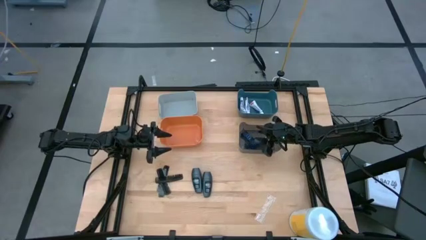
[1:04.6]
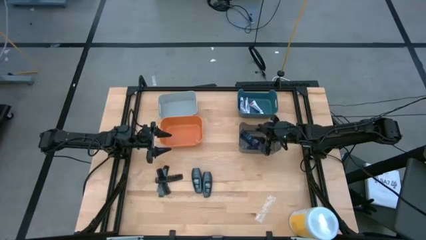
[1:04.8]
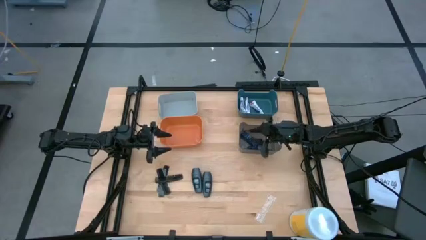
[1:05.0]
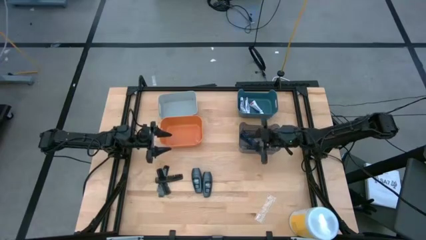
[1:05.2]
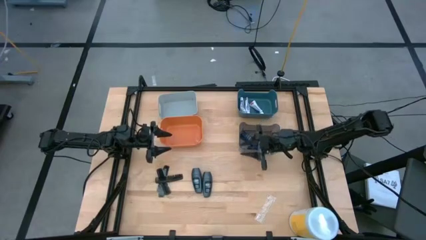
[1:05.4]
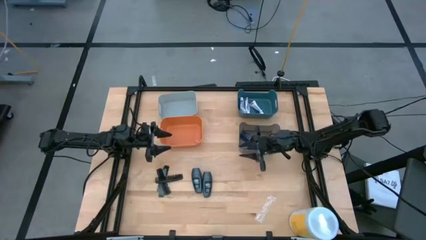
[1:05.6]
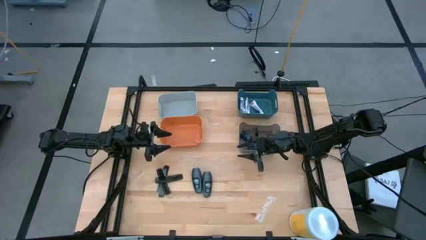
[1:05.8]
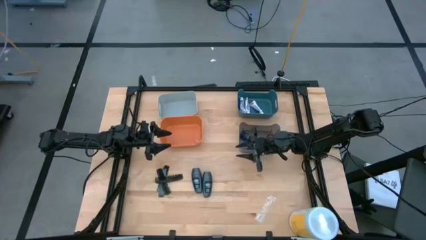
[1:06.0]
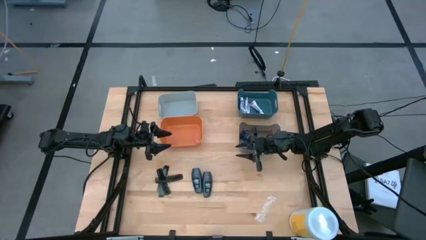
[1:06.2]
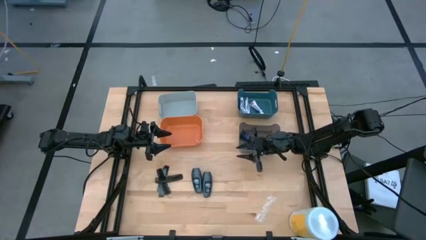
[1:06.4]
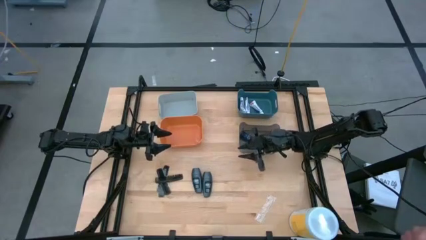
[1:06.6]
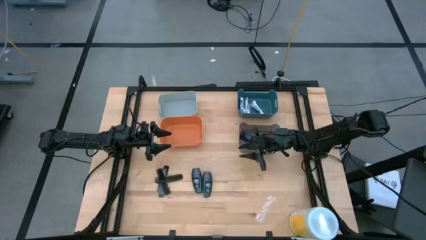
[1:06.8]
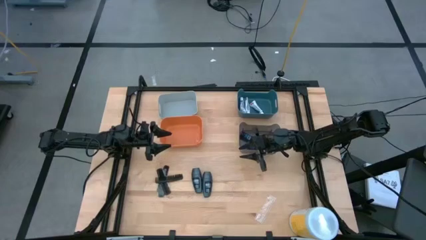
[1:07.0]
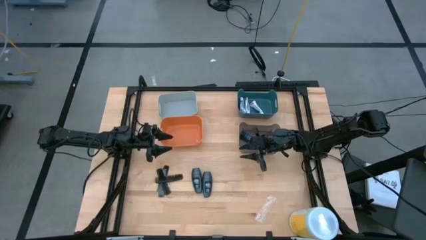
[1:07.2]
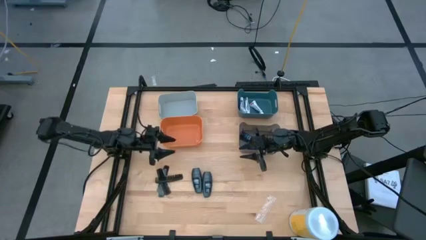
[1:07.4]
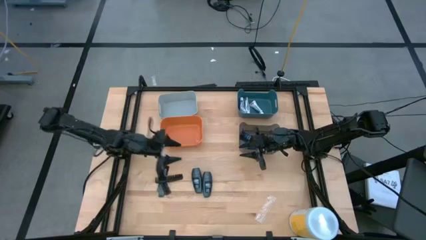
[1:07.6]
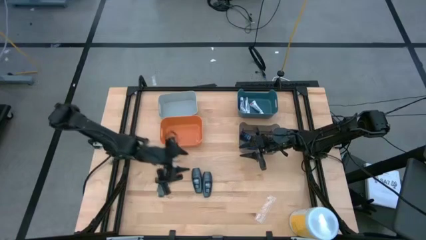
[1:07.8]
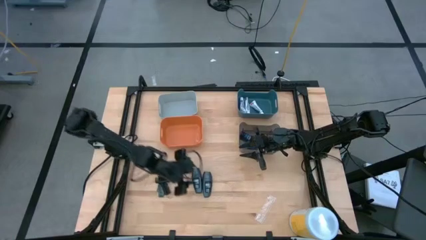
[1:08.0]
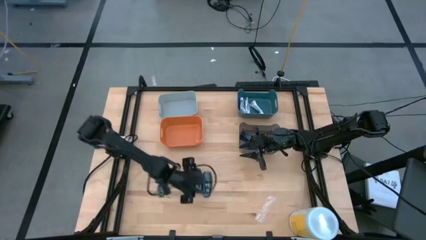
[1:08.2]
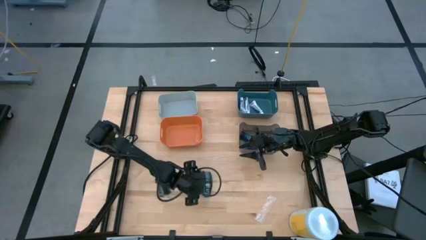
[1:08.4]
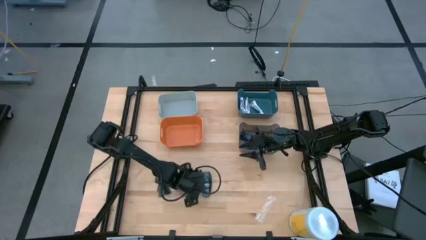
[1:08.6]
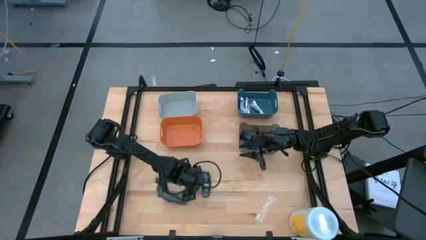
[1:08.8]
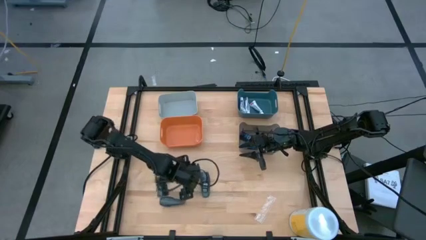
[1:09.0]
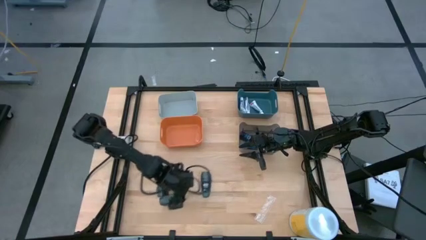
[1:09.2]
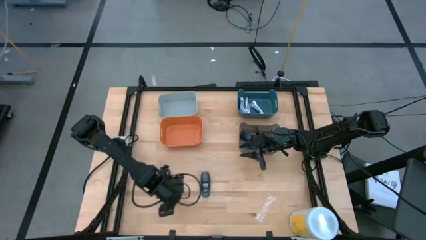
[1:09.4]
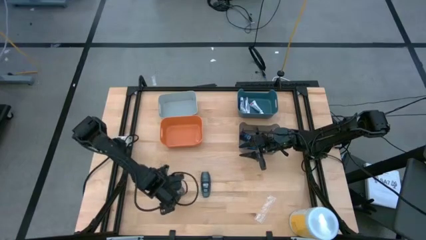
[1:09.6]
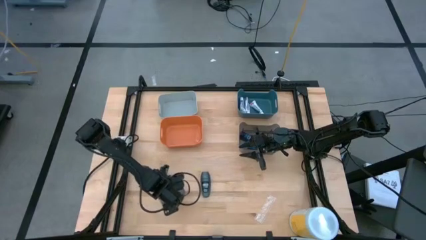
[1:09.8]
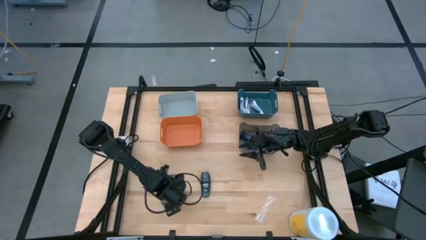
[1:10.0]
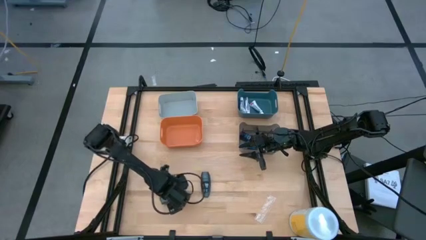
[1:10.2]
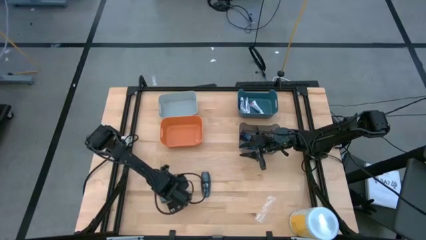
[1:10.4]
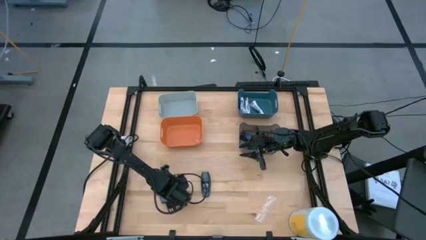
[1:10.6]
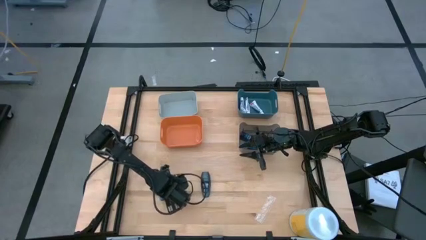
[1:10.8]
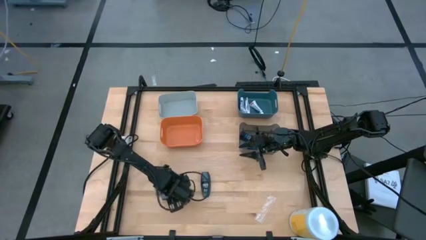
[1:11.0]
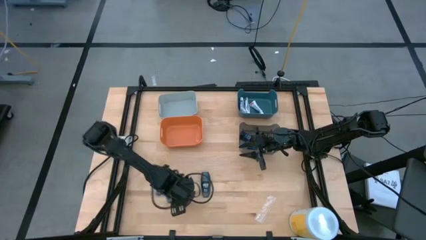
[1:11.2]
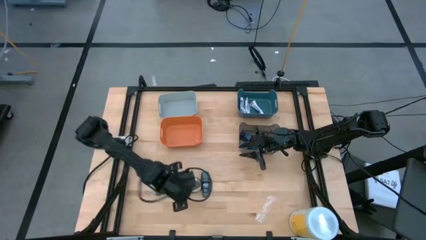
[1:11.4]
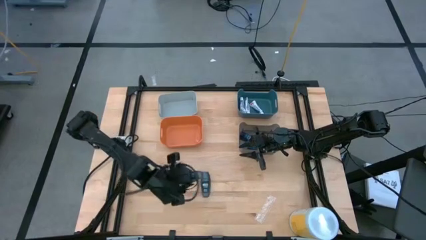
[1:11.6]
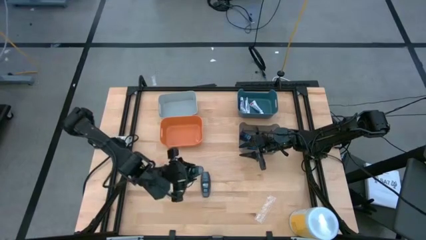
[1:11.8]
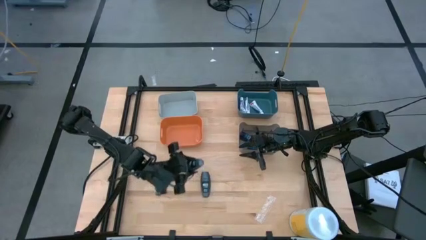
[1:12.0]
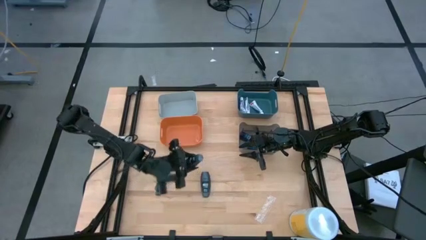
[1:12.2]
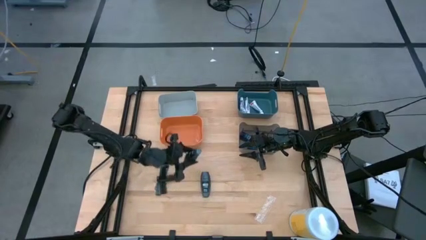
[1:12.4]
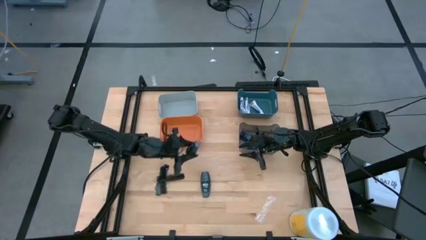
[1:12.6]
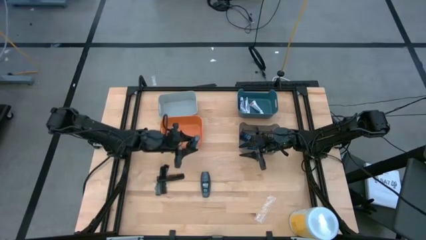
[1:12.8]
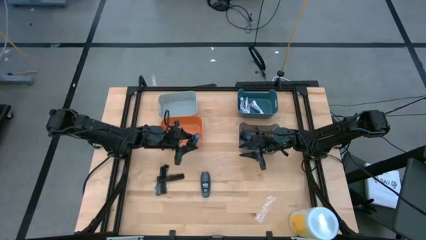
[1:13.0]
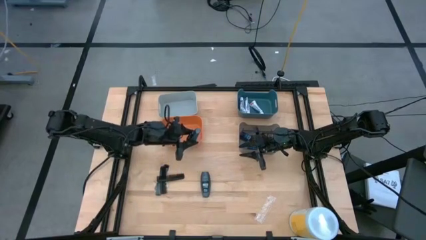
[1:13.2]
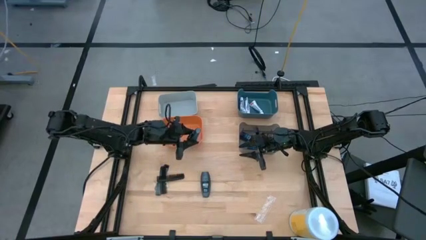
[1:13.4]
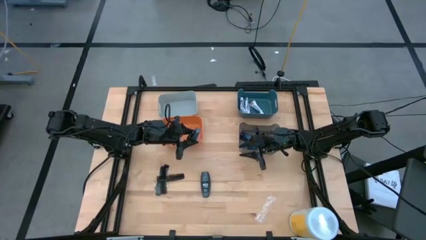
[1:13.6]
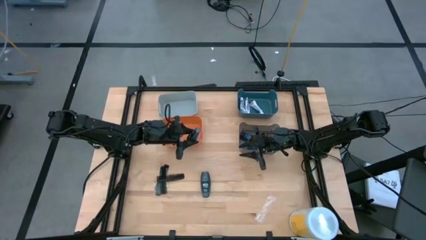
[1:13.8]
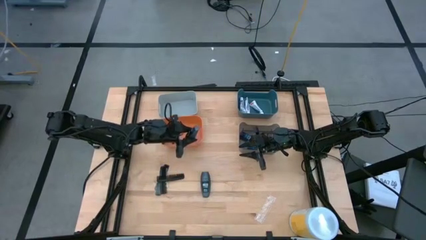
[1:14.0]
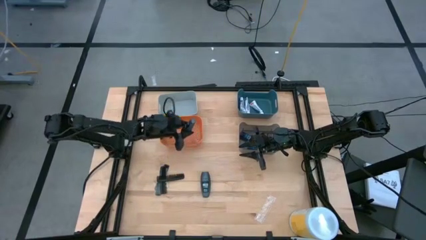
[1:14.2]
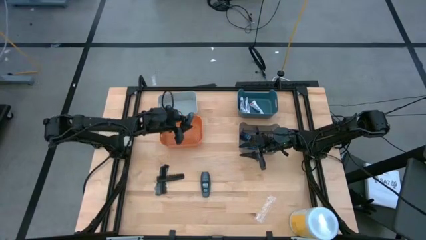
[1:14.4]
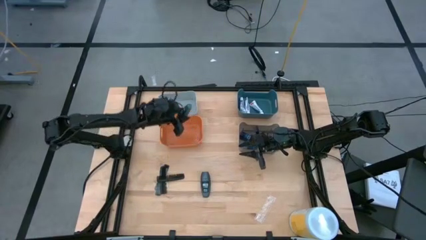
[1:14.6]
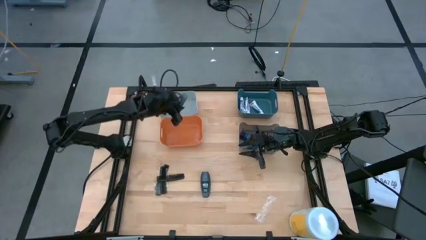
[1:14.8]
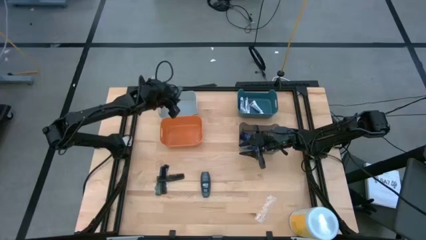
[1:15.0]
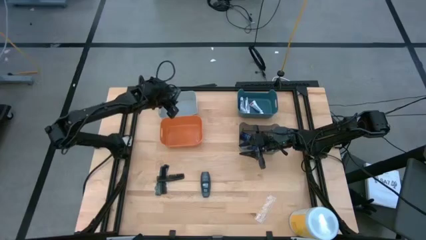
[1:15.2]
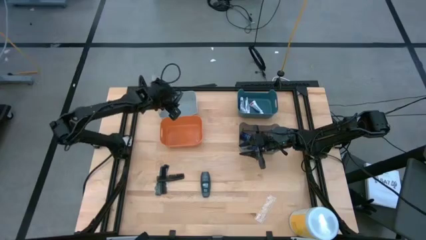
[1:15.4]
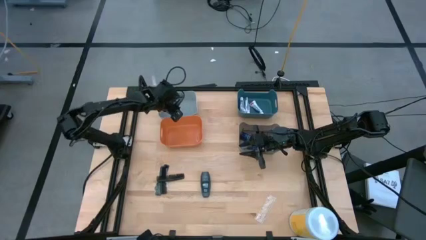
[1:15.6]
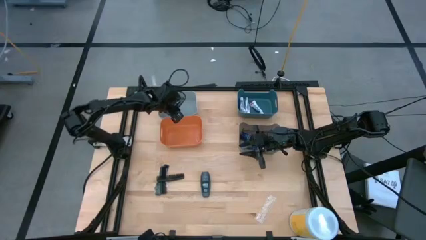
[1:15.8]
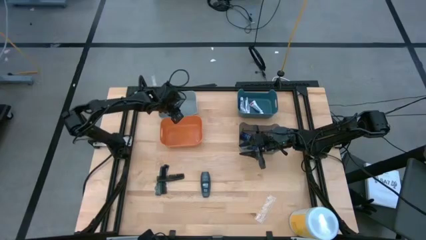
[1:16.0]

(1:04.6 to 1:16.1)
Task: Pick & Place Travel size toiletries
Put the gray deodorant into the gray bin

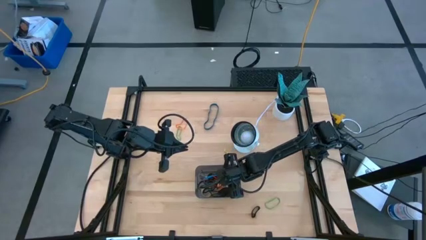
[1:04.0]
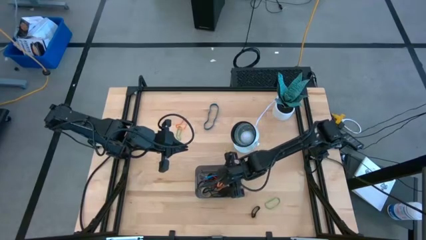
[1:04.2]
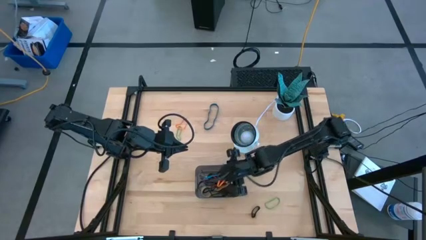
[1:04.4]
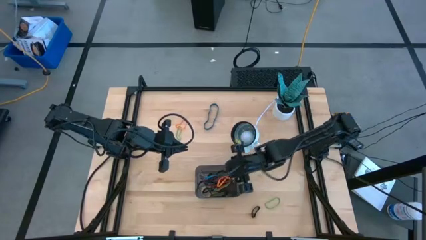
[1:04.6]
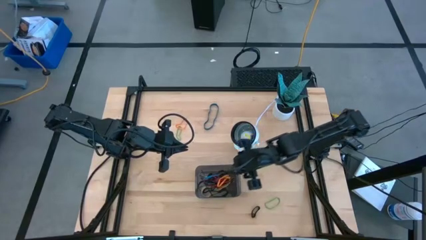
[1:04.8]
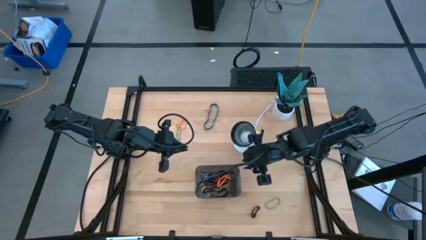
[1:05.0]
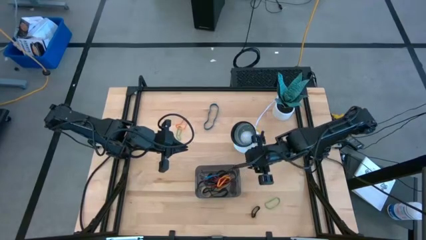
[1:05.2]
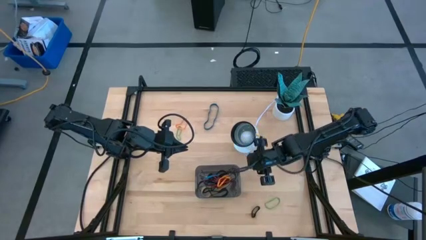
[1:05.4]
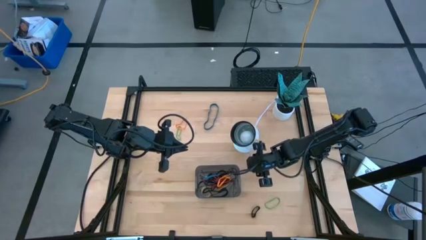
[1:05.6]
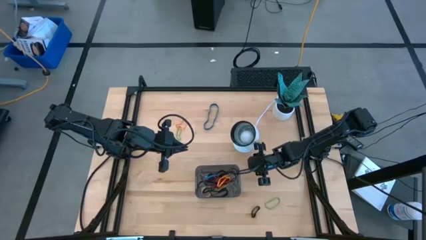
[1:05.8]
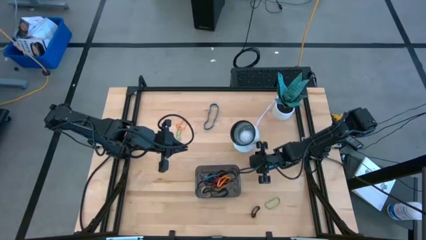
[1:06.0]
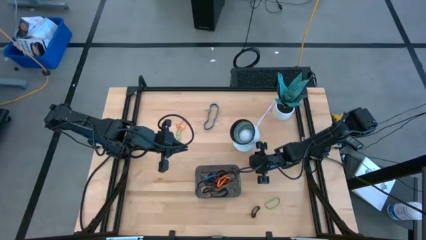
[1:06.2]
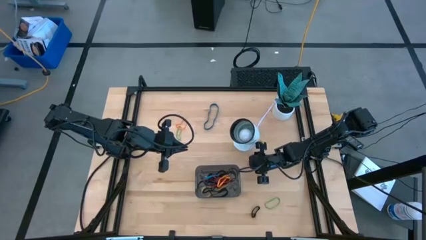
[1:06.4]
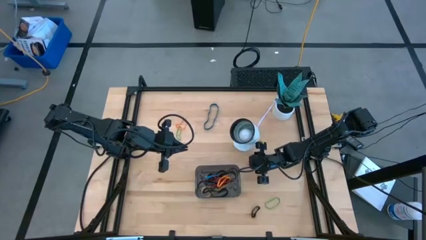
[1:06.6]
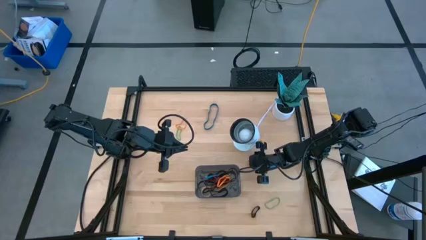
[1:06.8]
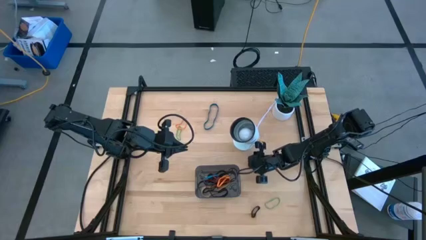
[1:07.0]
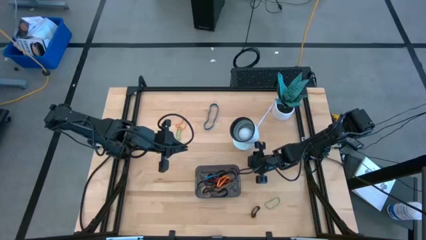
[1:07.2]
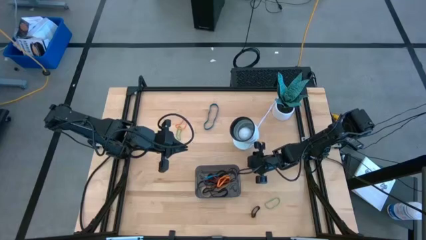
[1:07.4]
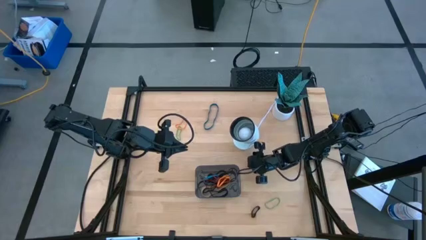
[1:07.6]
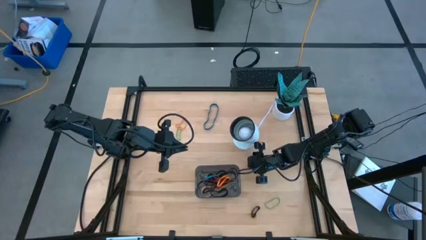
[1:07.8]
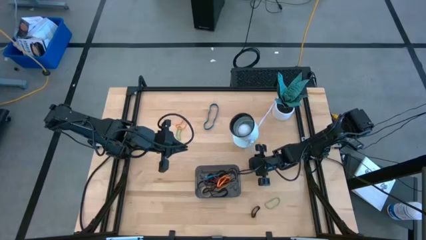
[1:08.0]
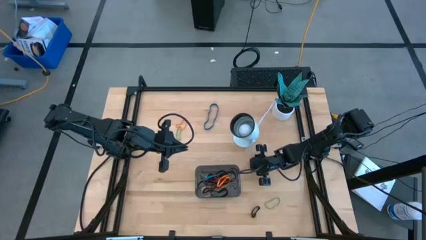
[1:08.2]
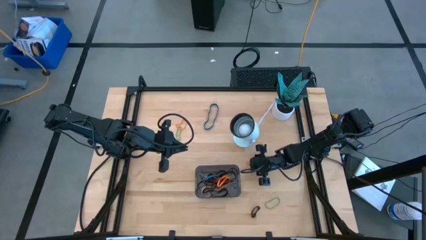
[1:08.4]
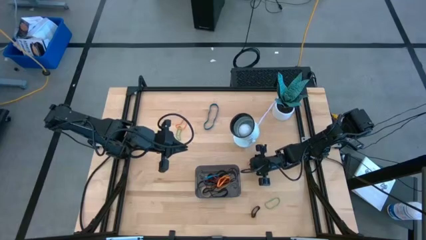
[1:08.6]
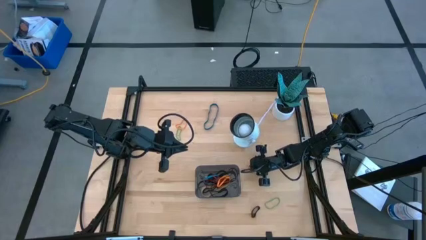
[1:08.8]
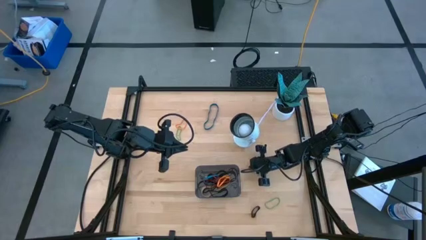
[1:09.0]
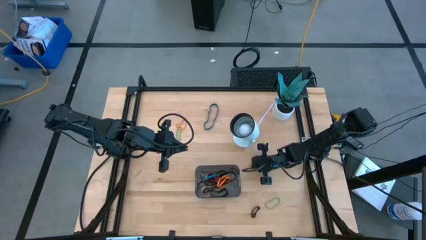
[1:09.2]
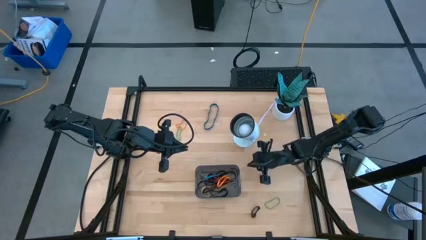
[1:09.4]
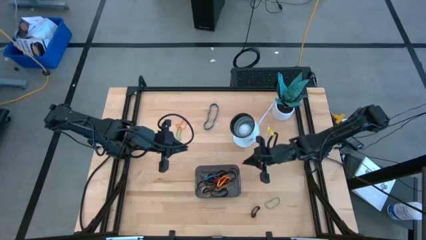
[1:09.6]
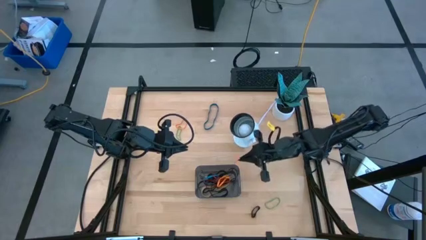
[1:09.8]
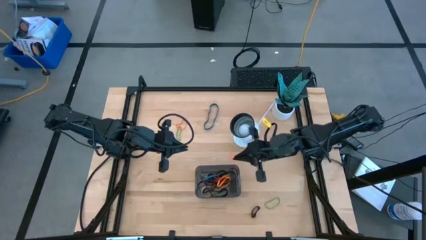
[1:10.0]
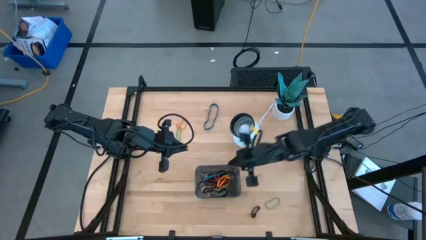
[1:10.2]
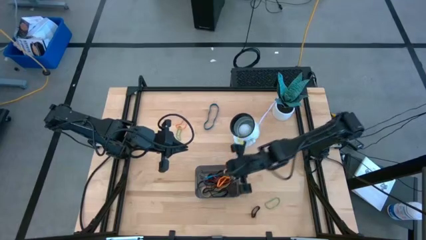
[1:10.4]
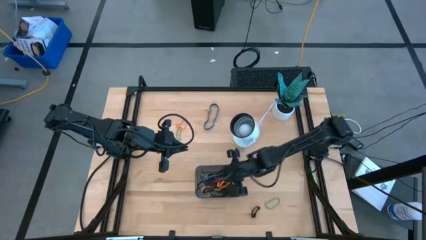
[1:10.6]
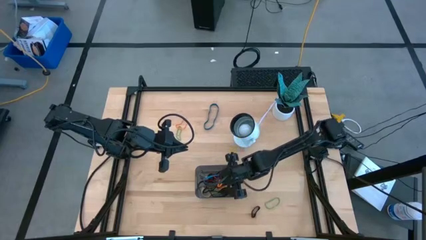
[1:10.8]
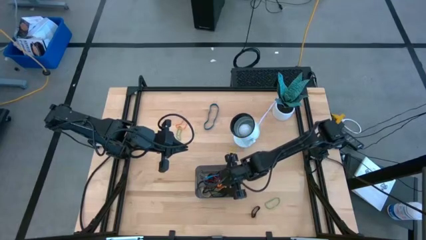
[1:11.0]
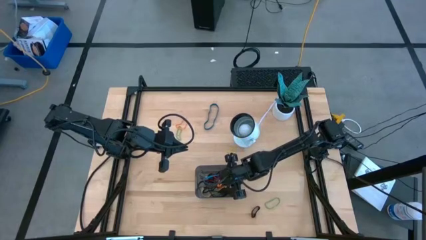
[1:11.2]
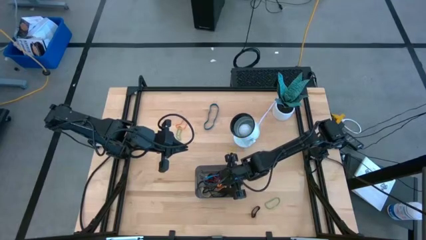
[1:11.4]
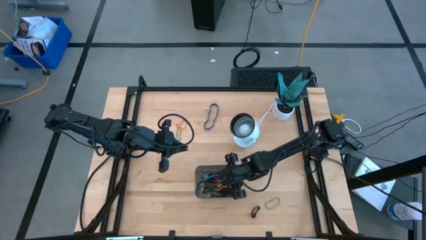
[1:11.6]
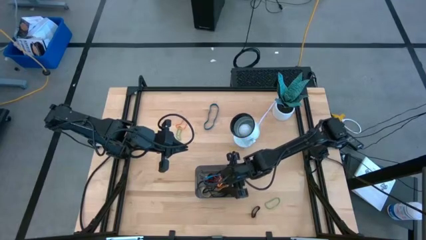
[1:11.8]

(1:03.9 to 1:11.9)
Task: Pick and place rubber bands into bin
Put the bottom orange rubber band into the black bin
